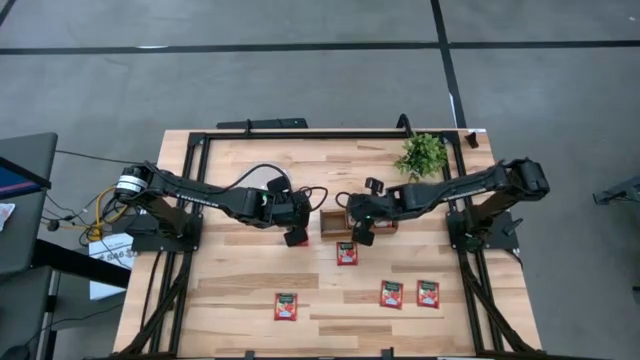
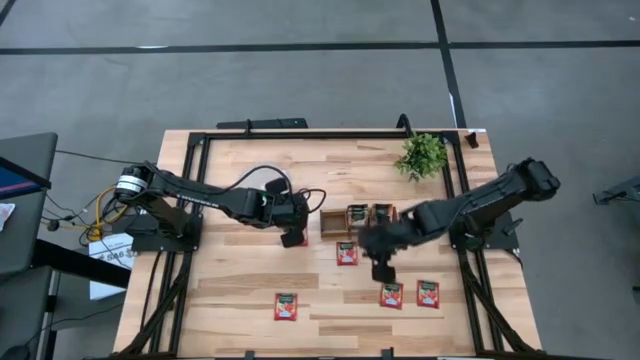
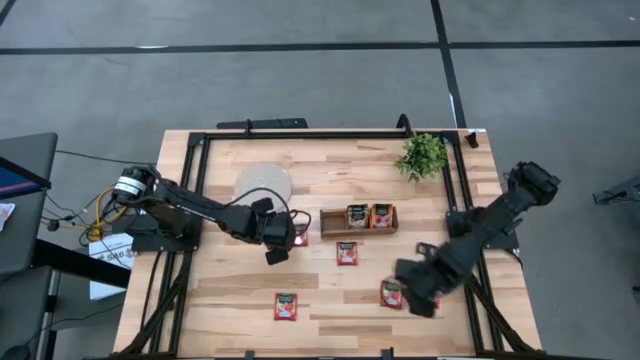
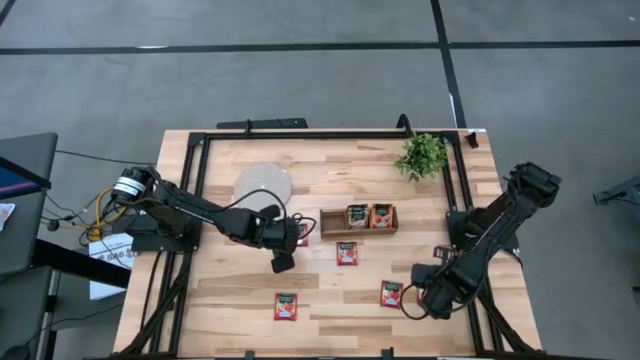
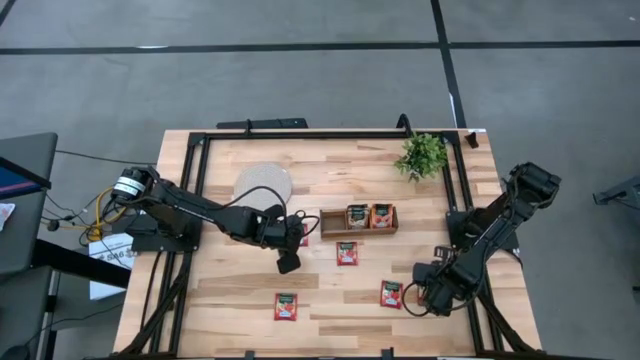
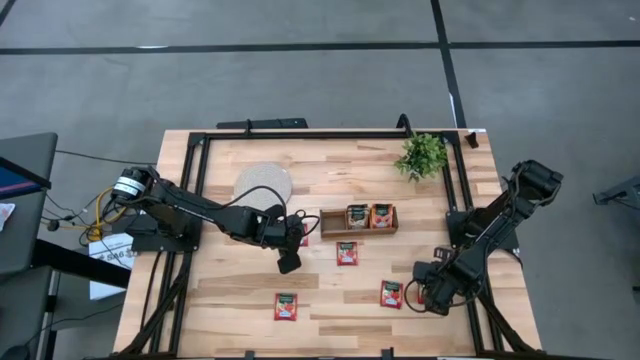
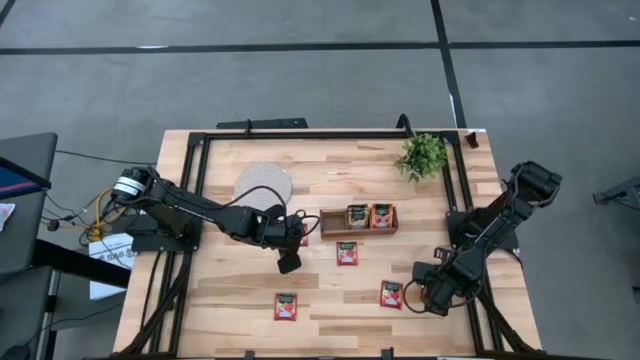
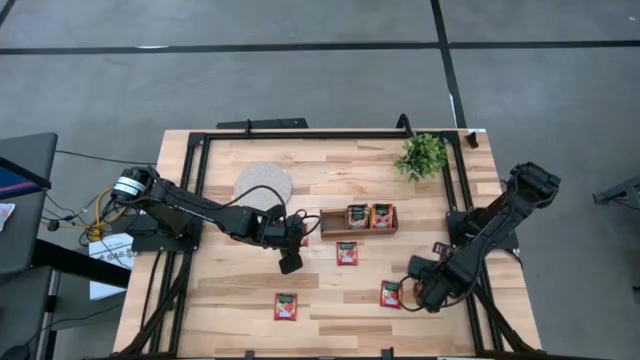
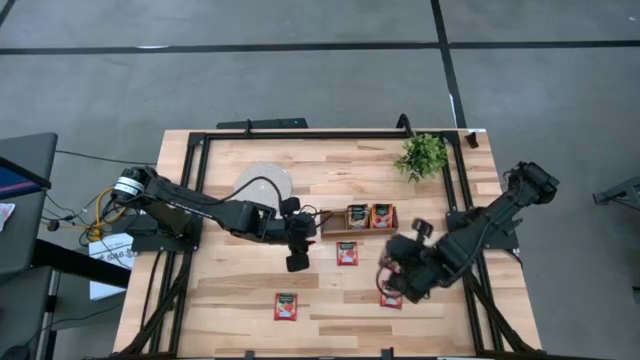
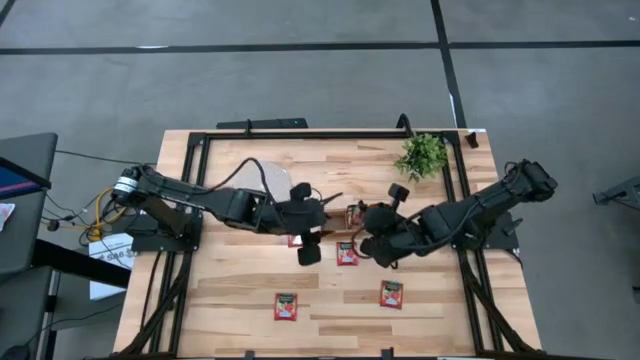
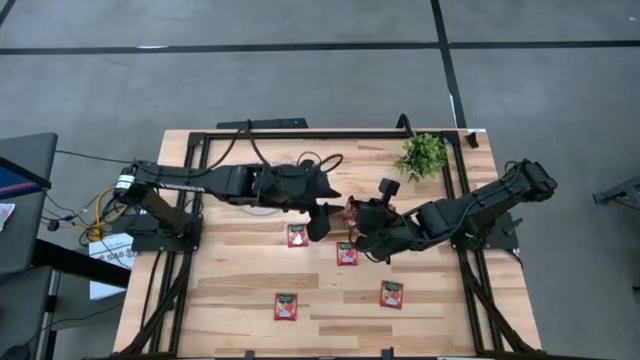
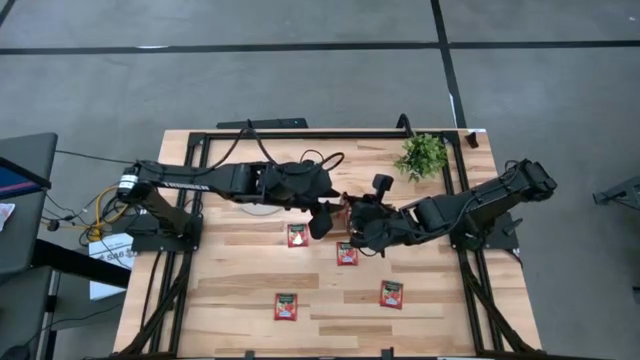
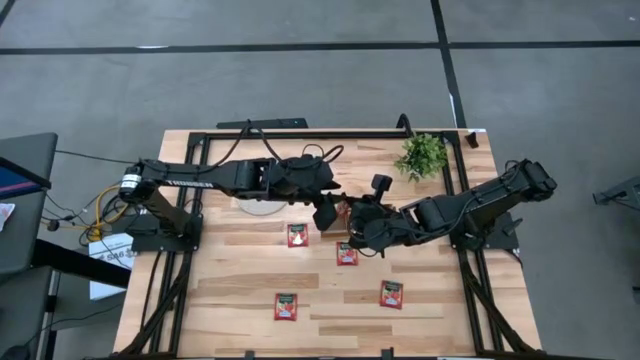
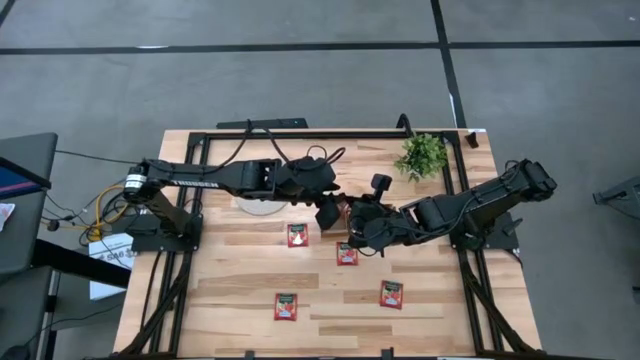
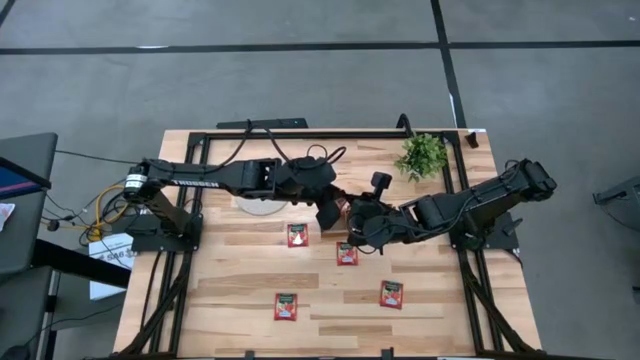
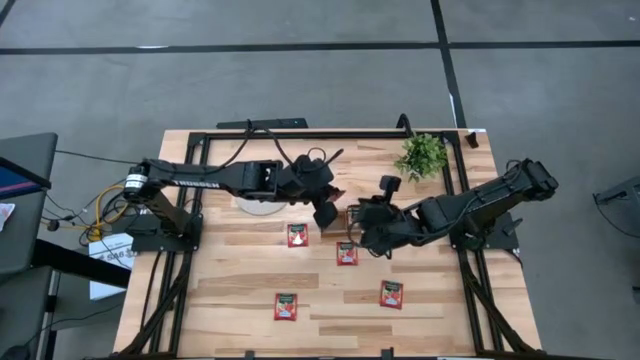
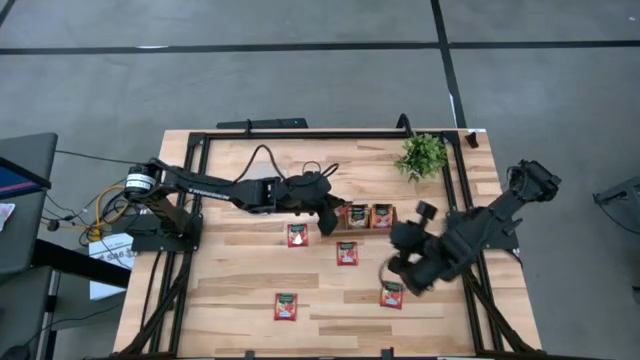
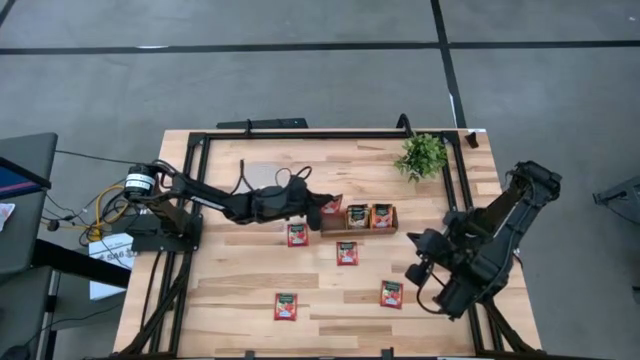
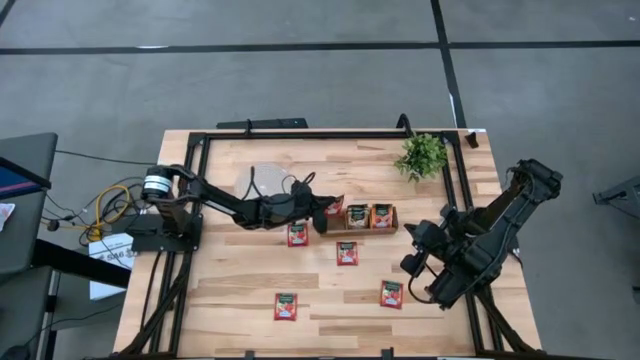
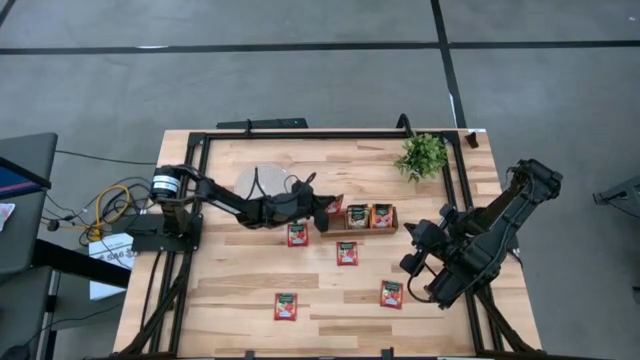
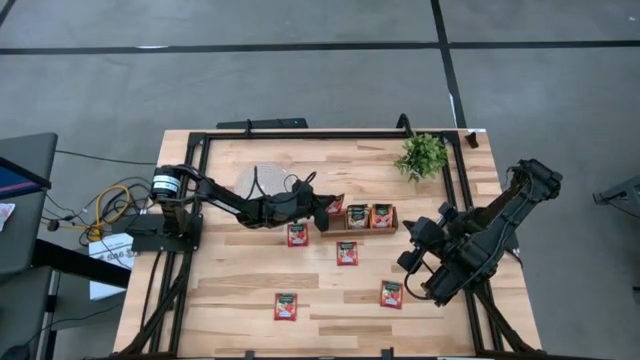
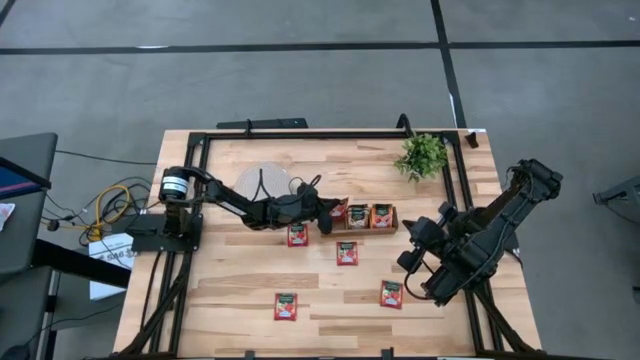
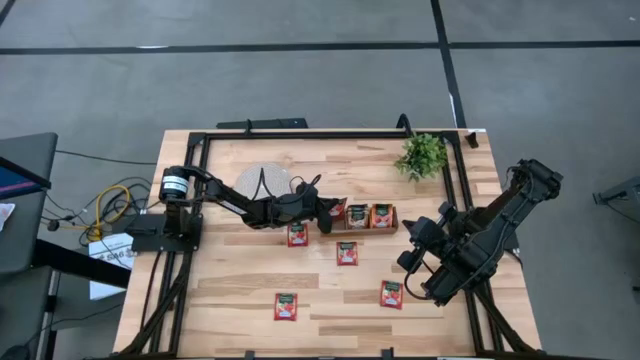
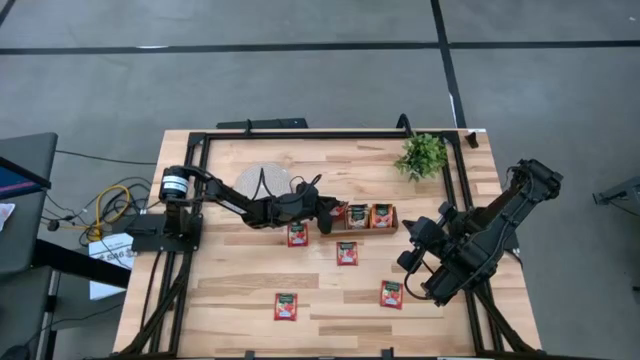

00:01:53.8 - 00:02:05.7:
Task: Pick & Place Tea
Put the red tea bag into the left section of the wooden organizer

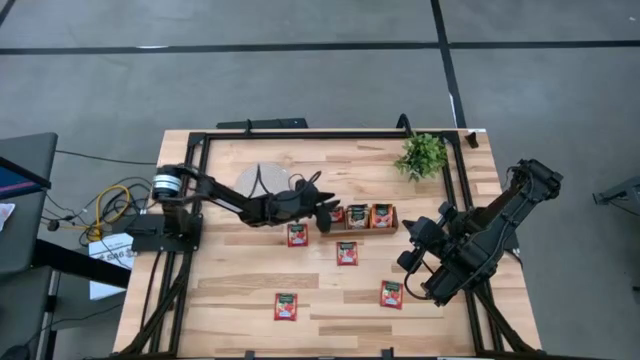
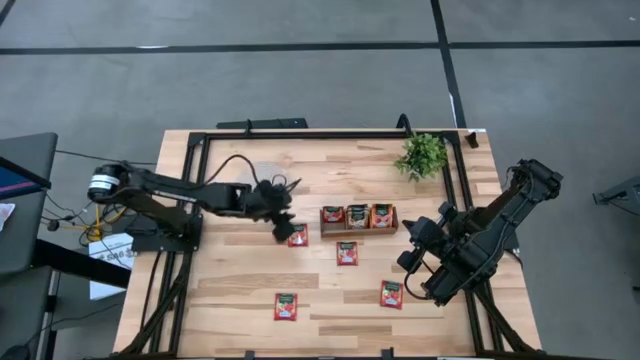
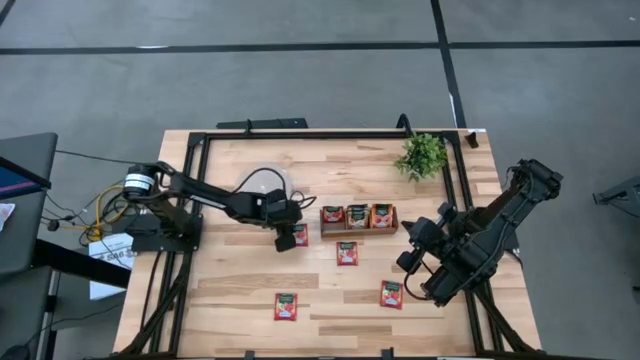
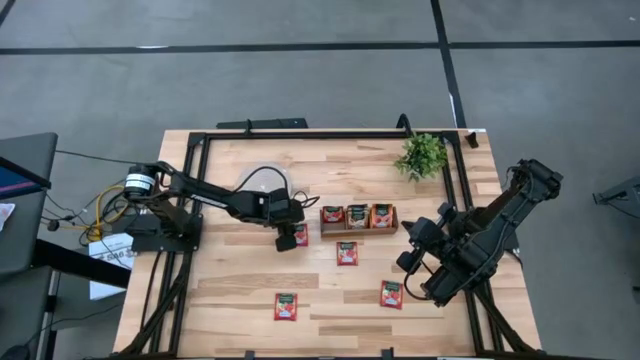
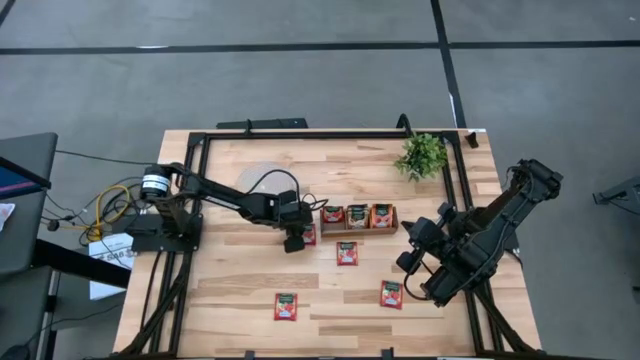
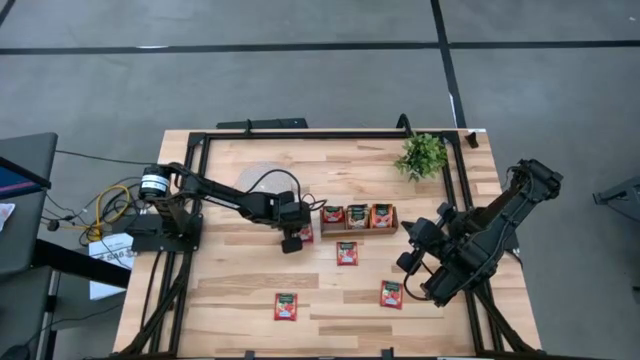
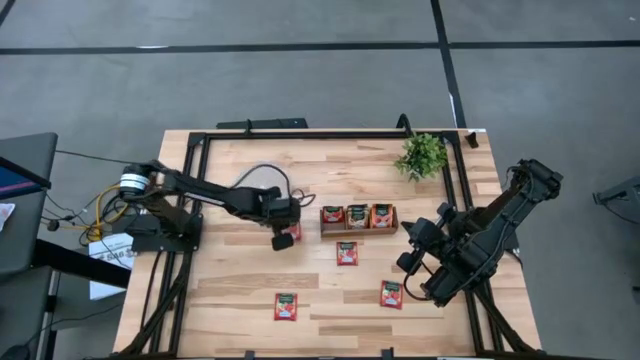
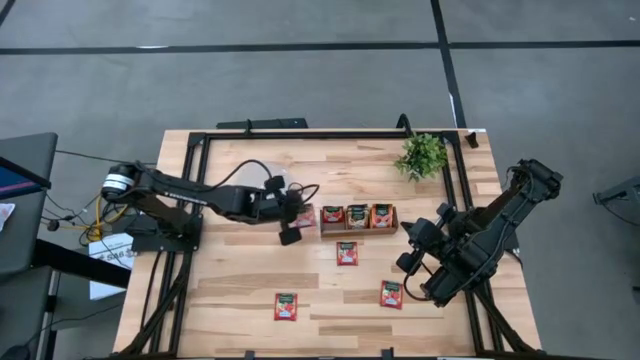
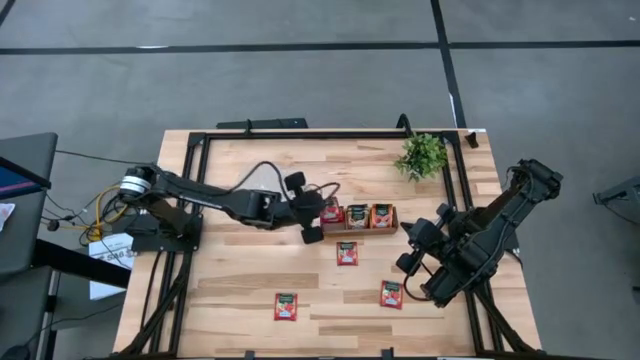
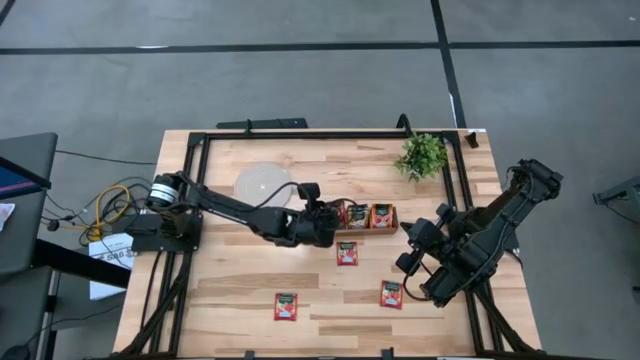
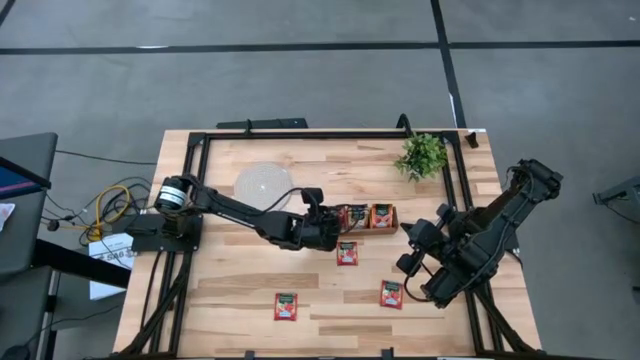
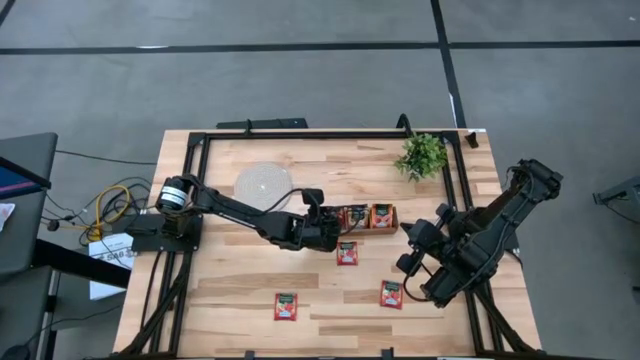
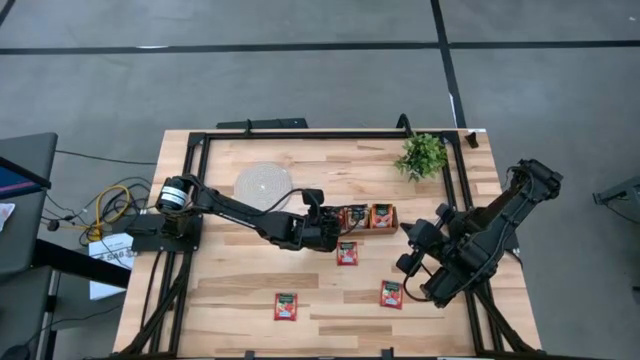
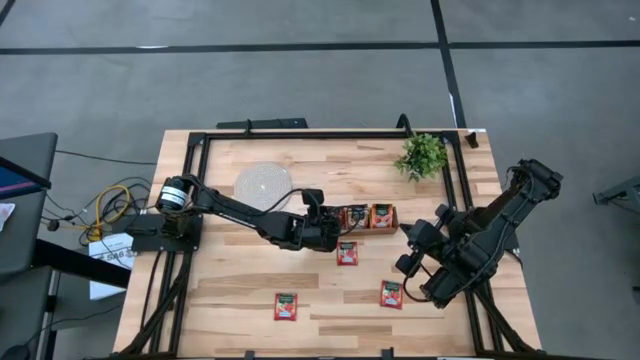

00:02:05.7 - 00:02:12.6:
Put the red tea bag into the left section of the wooden organizer

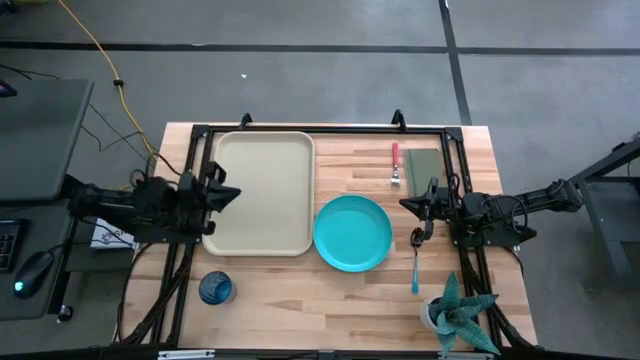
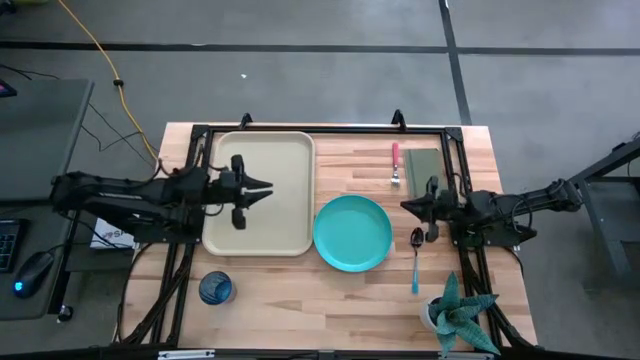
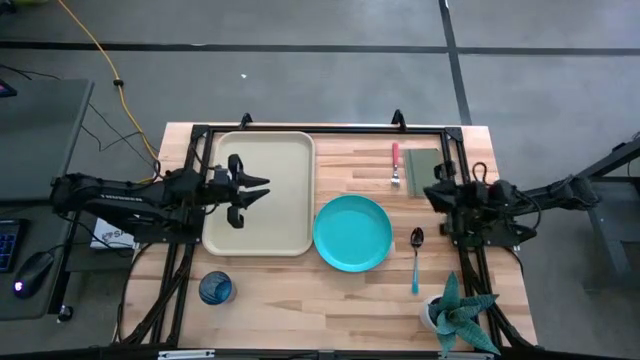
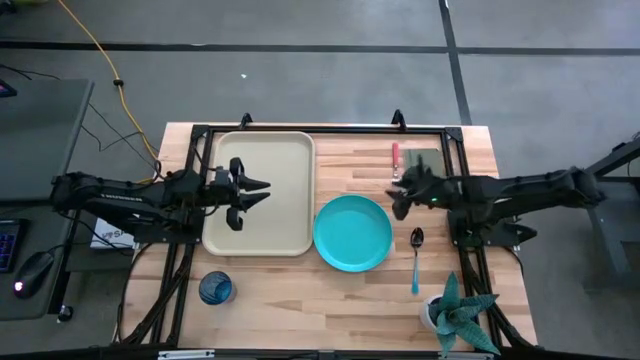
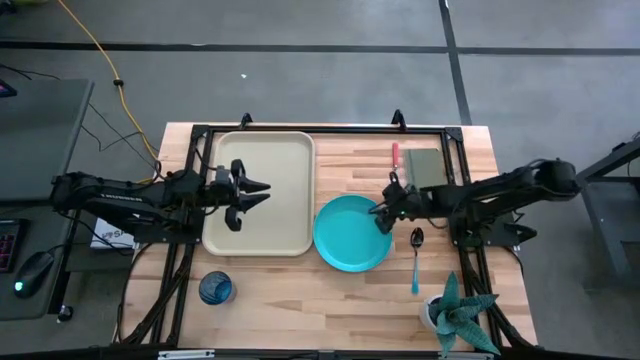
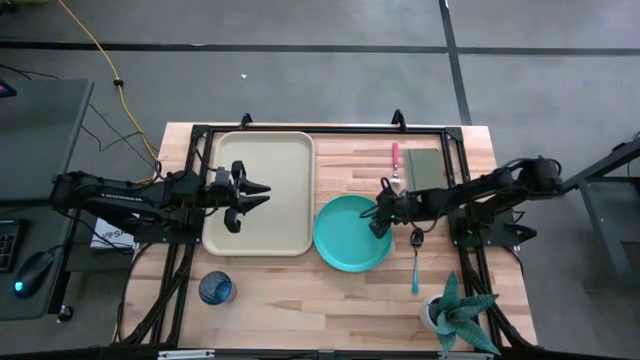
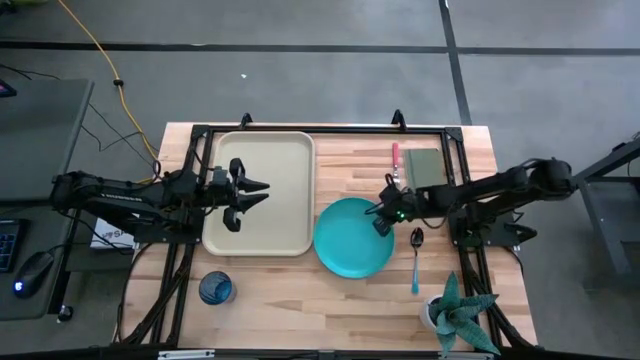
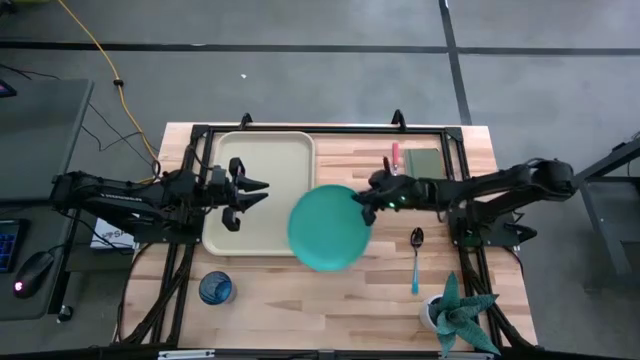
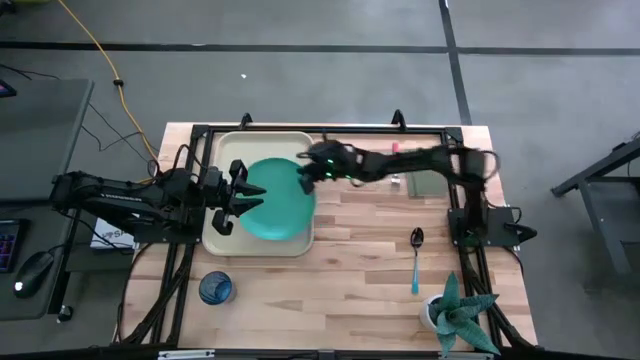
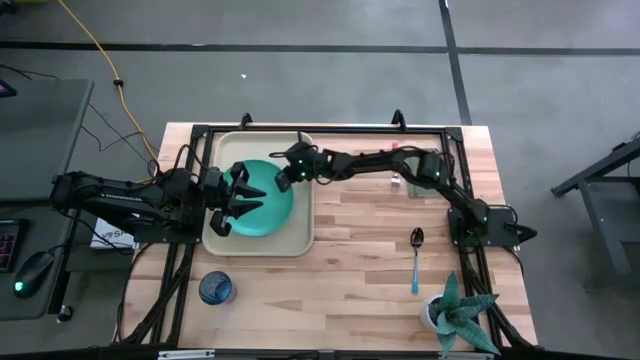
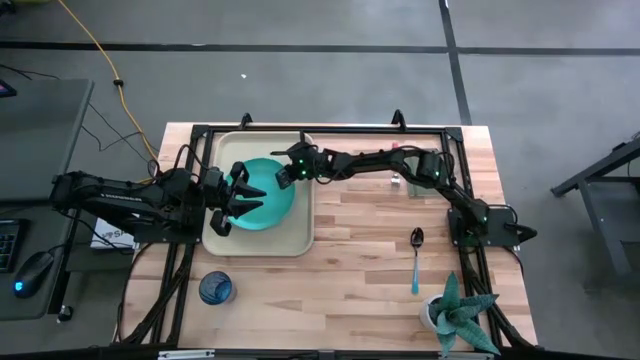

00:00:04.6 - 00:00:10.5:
Task: Pick and place plate/cup/fork/spoon on tray
Put the blue plate on the light brown tray
